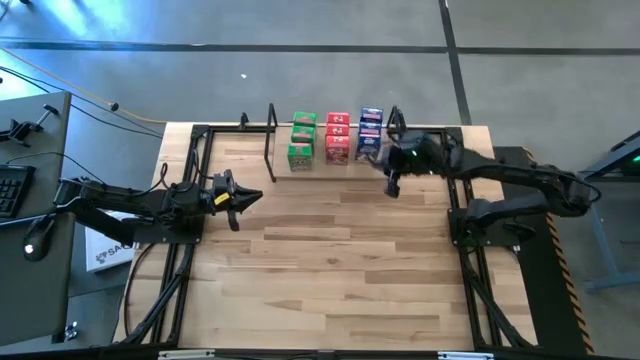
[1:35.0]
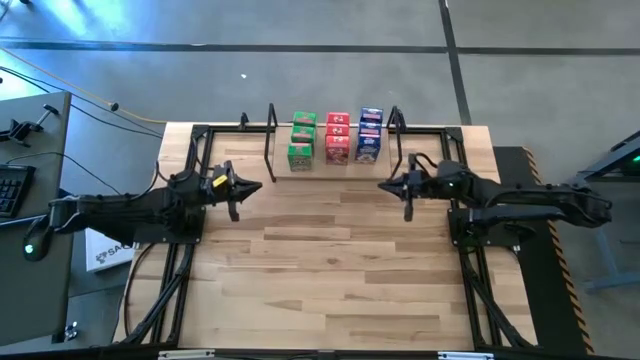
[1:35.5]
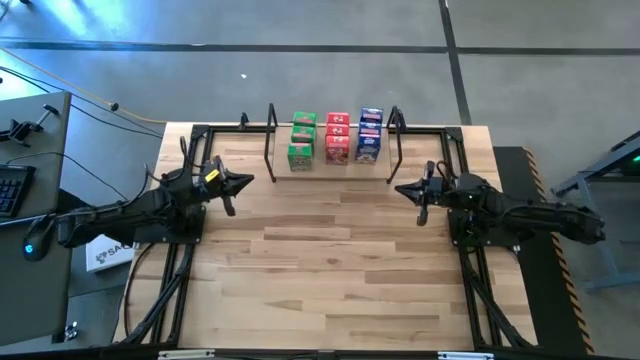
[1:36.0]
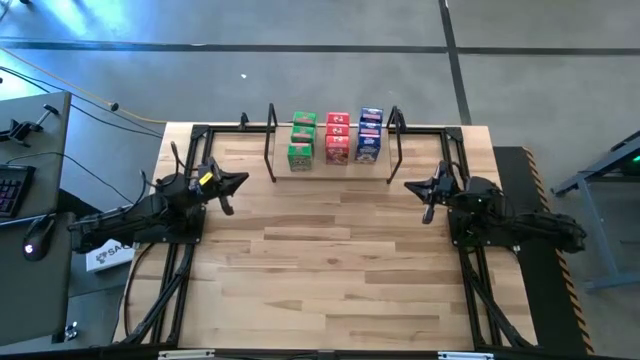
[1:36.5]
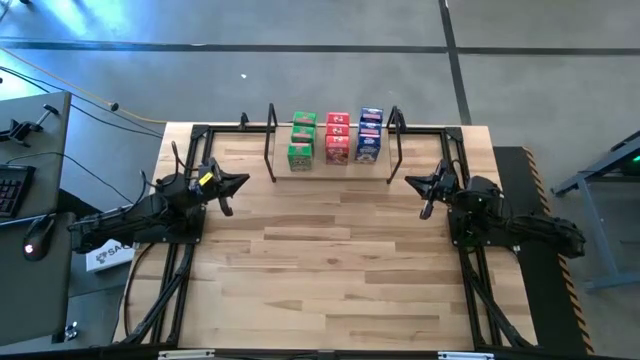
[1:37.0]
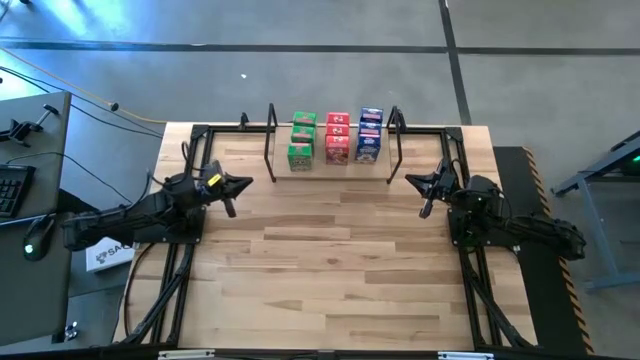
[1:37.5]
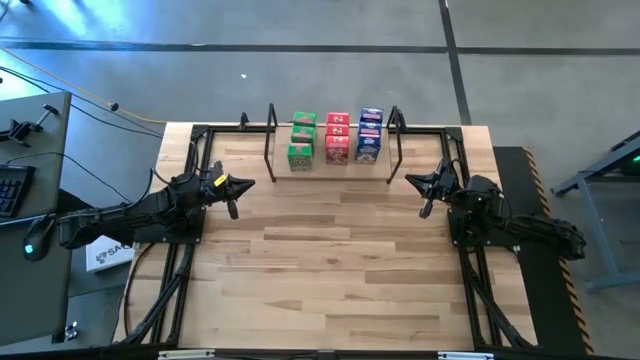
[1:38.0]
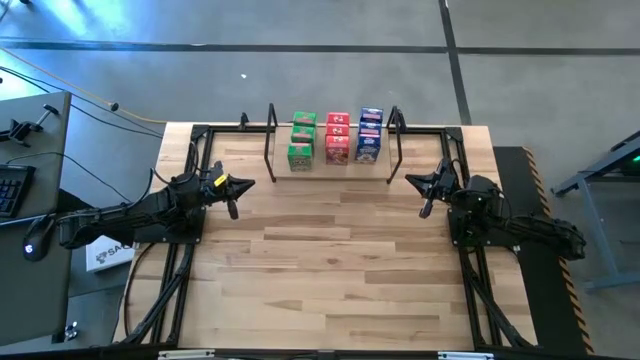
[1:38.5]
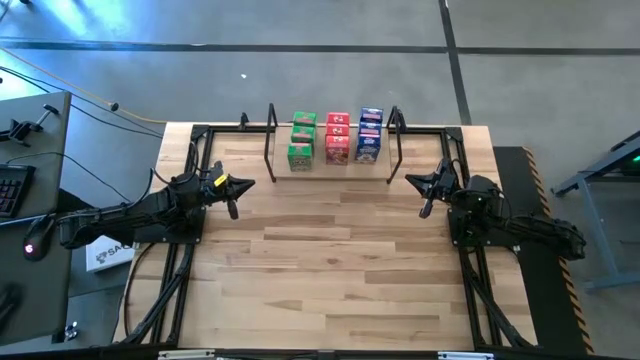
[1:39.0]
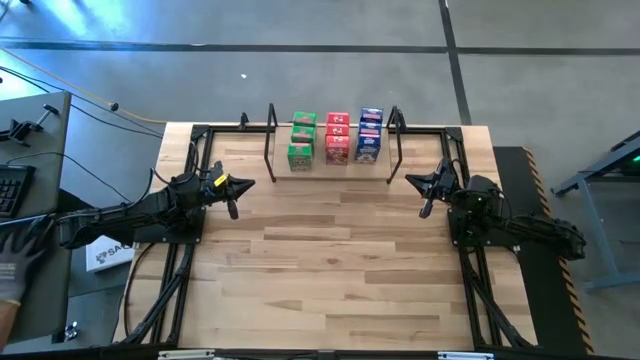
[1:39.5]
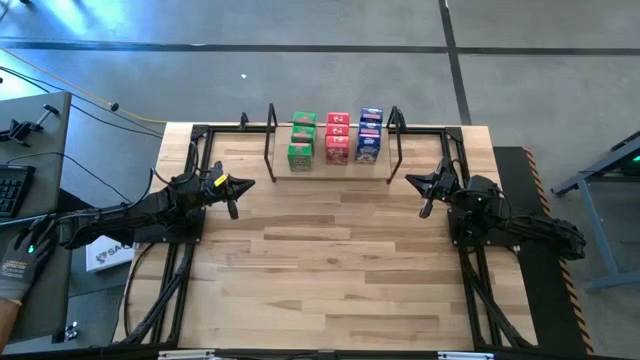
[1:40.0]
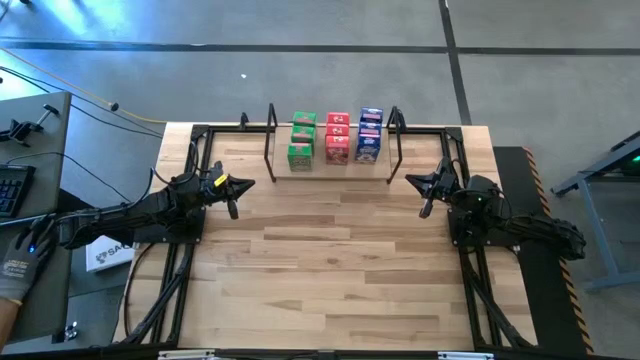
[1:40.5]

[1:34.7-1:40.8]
Task: Stack cereal on shelf
Return to Home Position

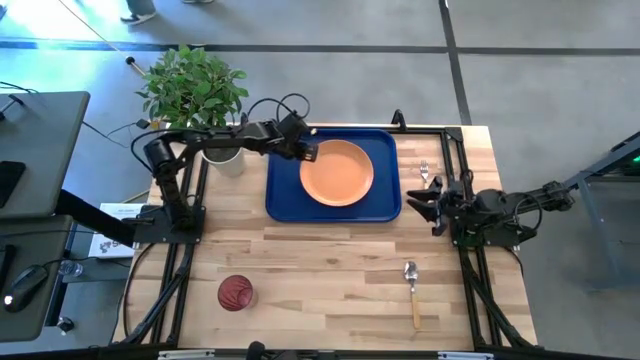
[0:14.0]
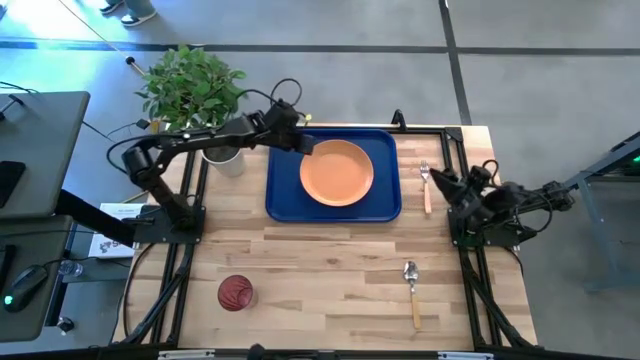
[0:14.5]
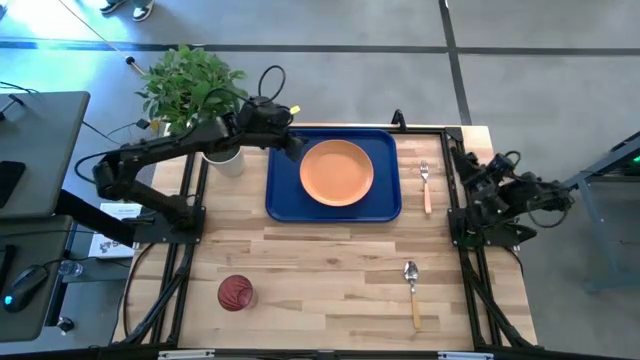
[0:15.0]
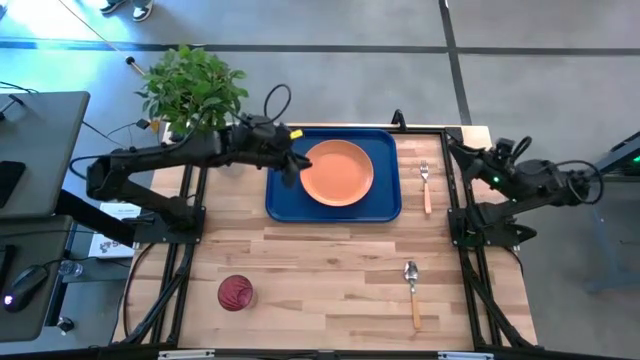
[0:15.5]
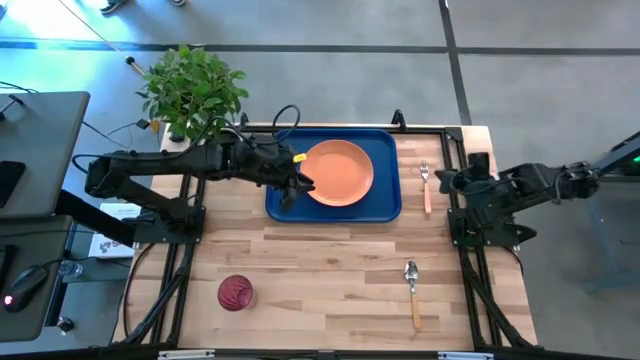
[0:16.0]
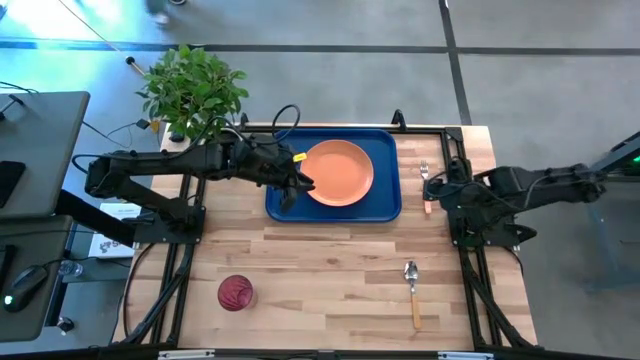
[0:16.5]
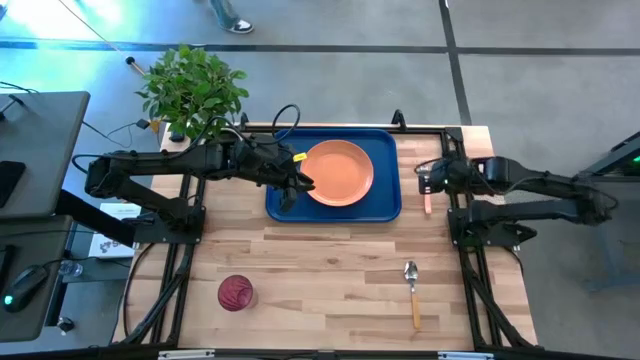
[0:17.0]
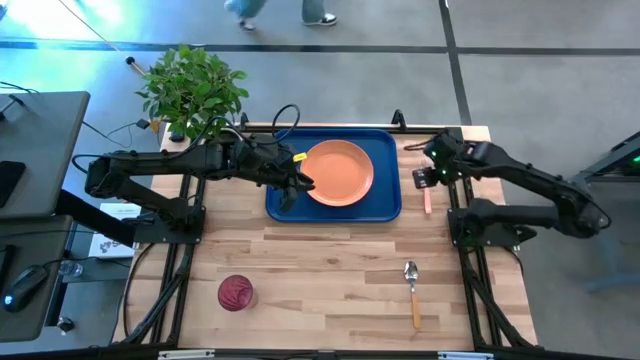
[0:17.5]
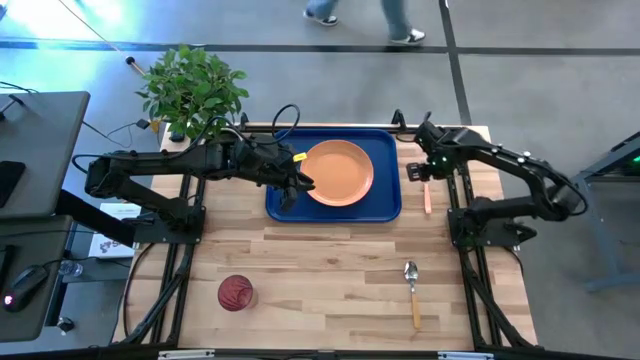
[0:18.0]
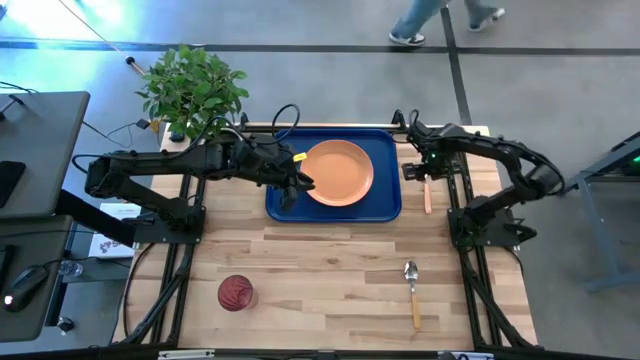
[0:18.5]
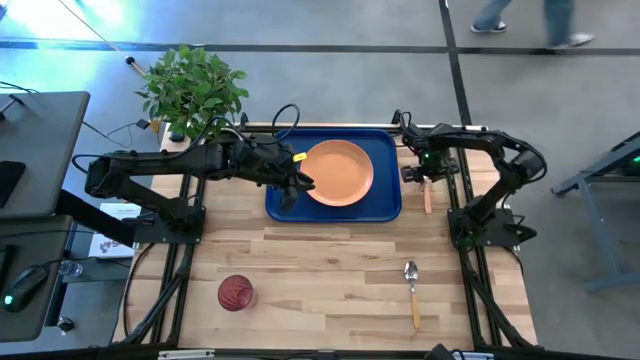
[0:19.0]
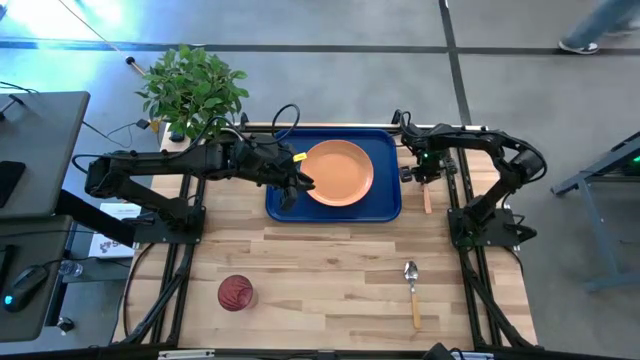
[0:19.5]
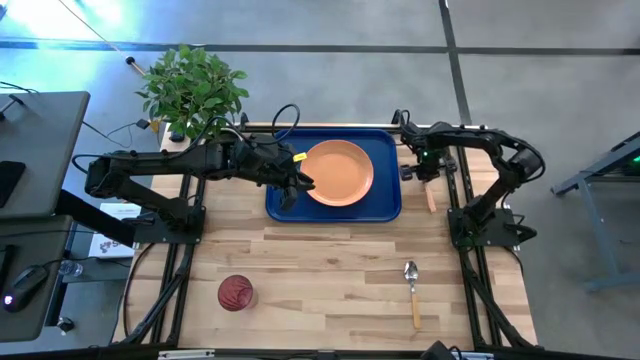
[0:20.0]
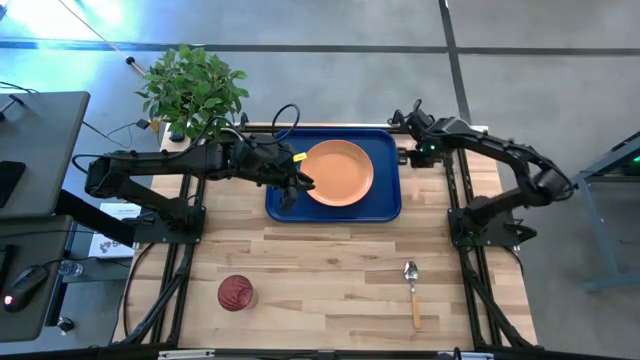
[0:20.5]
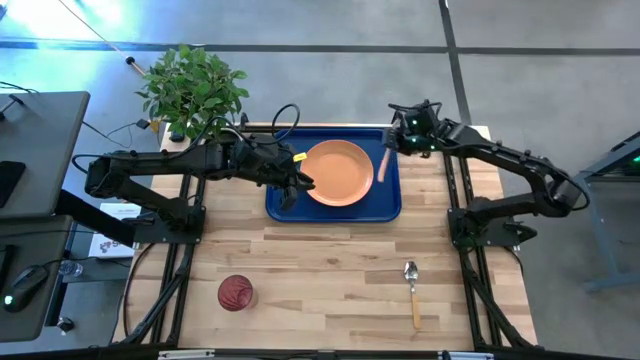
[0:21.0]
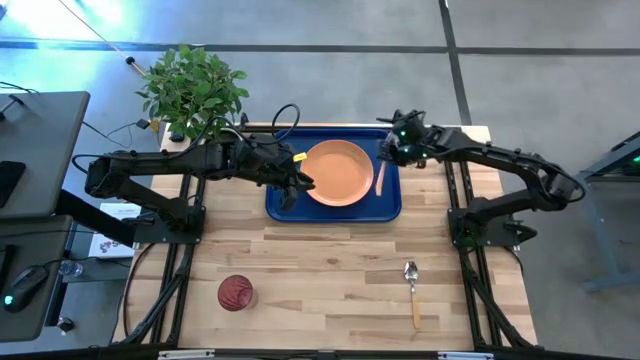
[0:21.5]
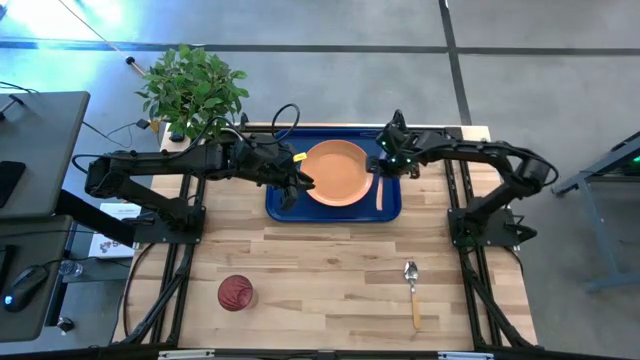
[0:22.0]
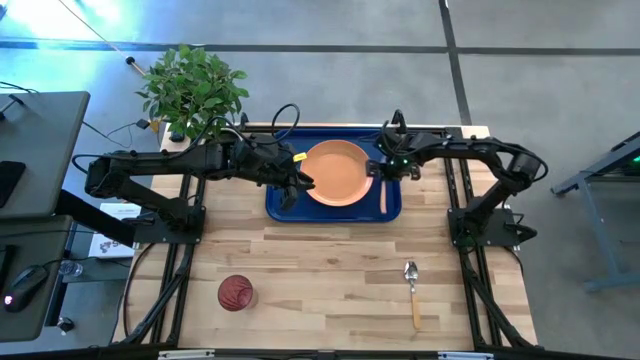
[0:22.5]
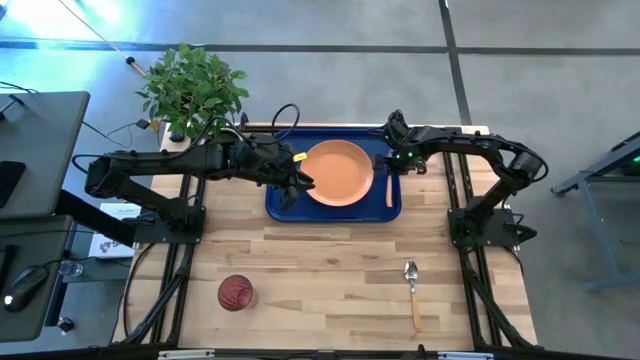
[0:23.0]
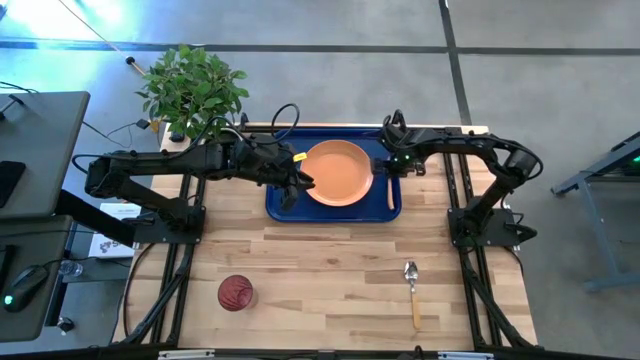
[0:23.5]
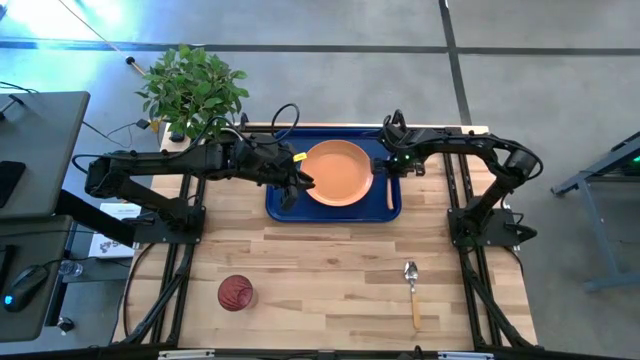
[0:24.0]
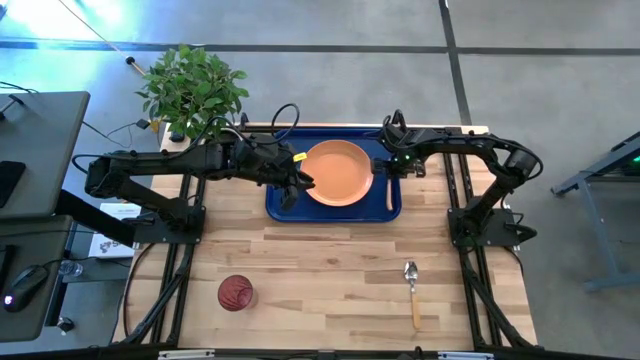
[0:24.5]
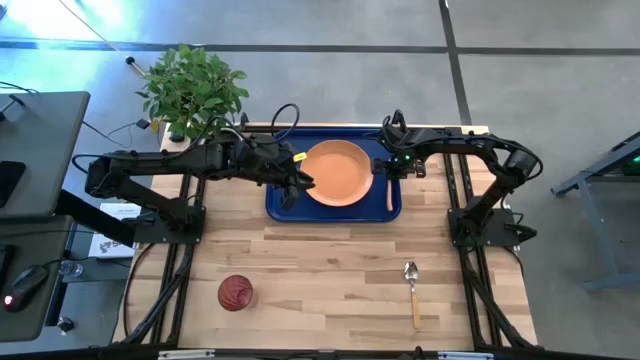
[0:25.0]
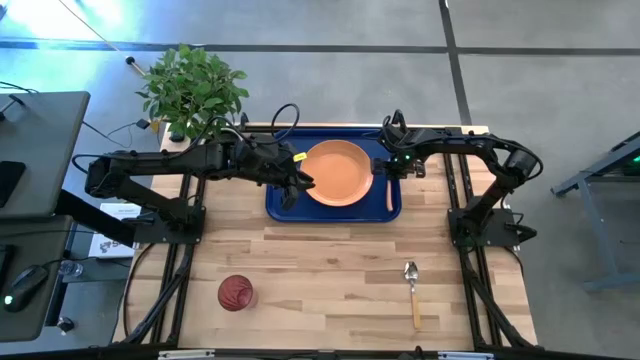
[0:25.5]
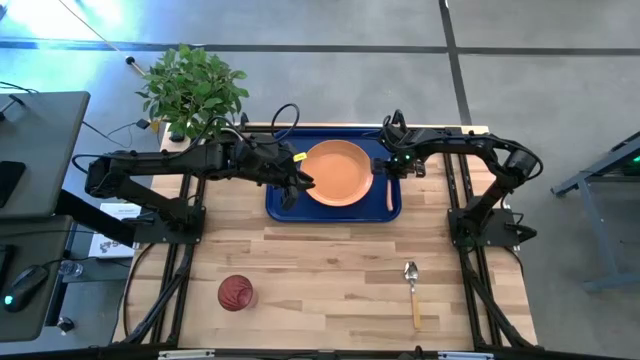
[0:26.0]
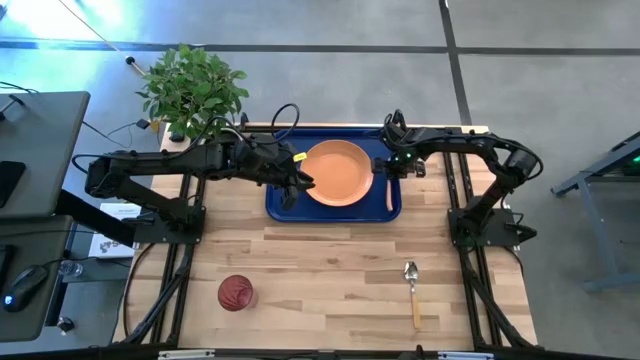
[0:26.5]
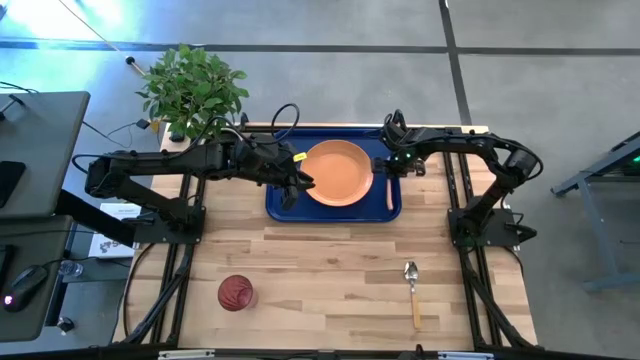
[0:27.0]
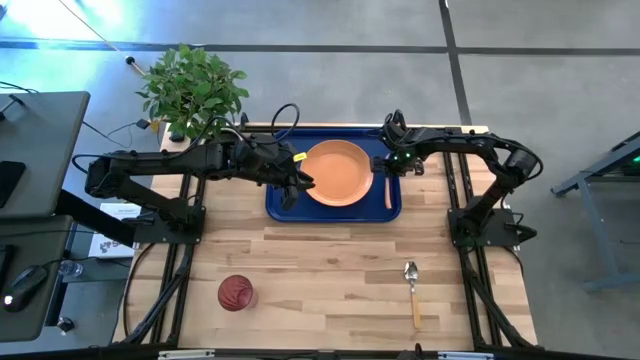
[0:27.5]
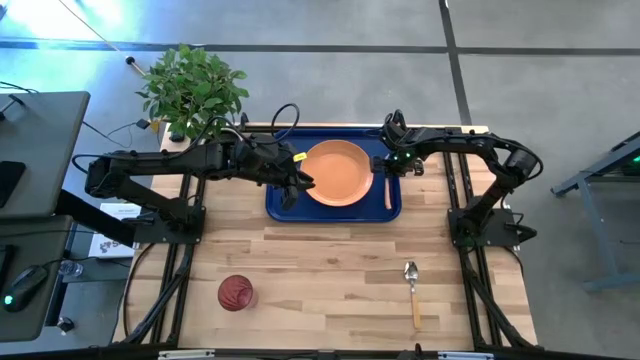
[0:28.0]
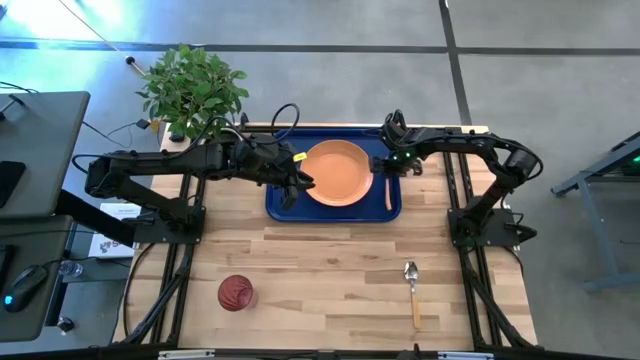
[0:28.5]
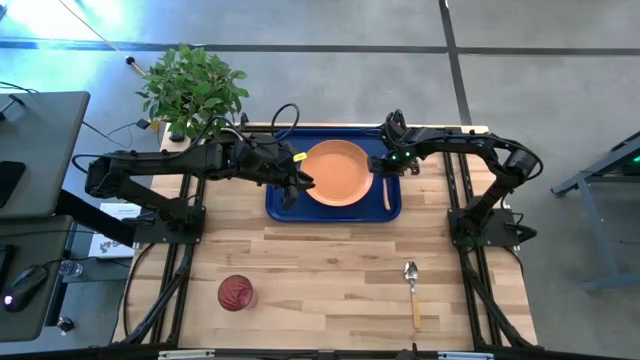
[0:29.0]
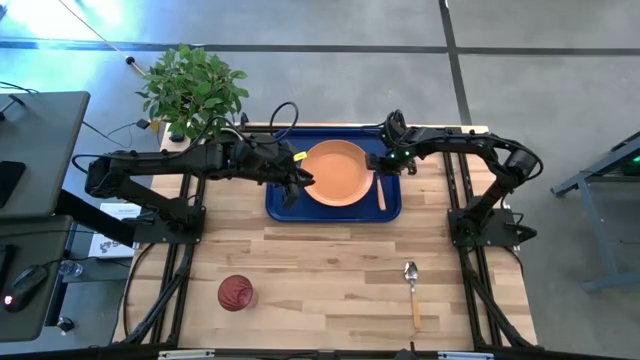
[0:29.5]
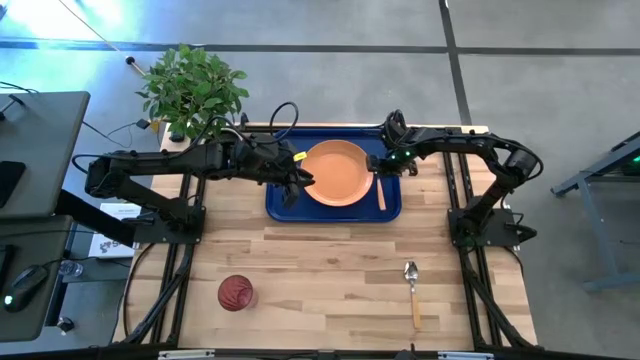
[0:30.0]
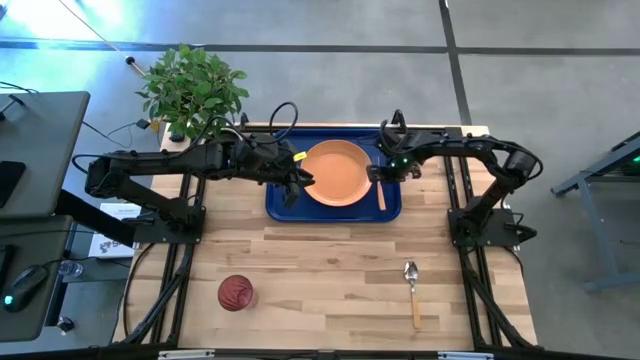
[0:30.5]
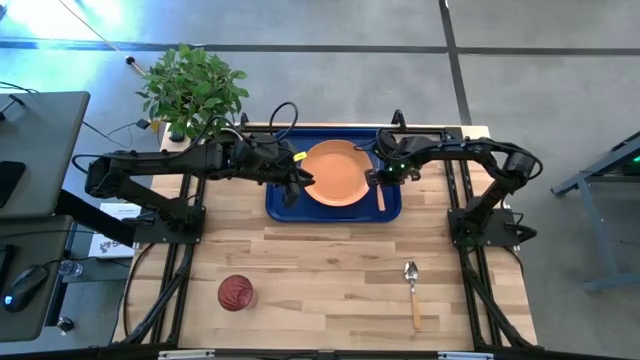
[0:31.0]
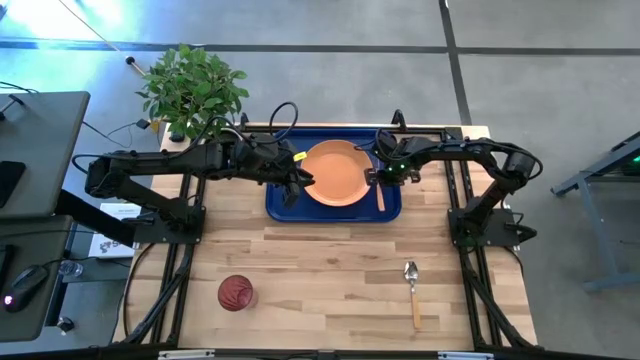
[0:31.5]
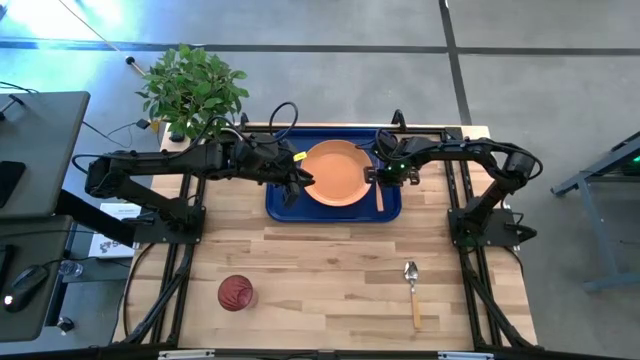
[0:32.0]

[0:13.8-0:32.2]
Task: Pick and place plate/cup/fork/spoon on tray
Put the yellow fork on the blue tray
